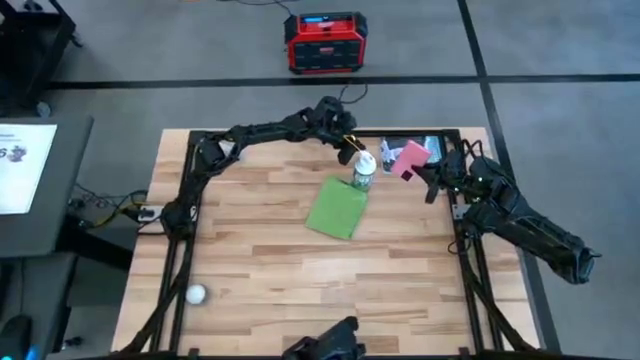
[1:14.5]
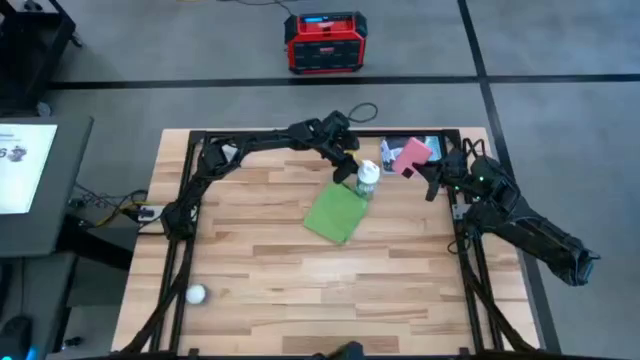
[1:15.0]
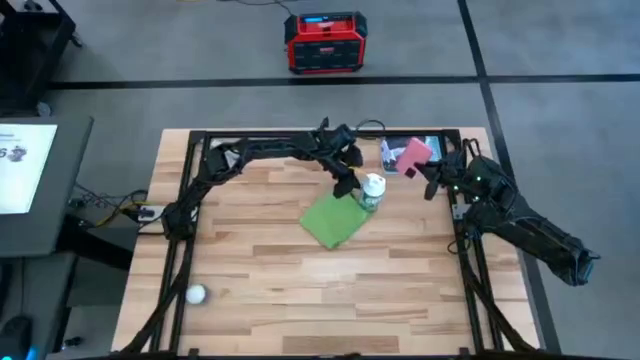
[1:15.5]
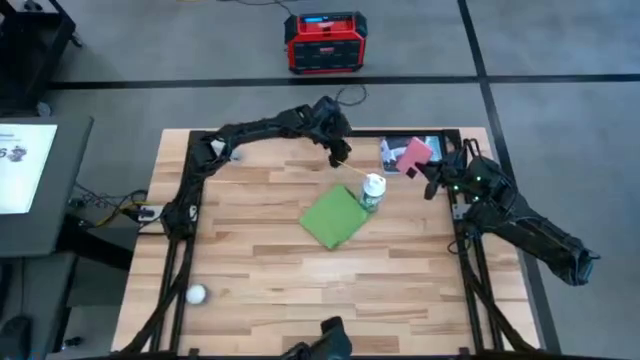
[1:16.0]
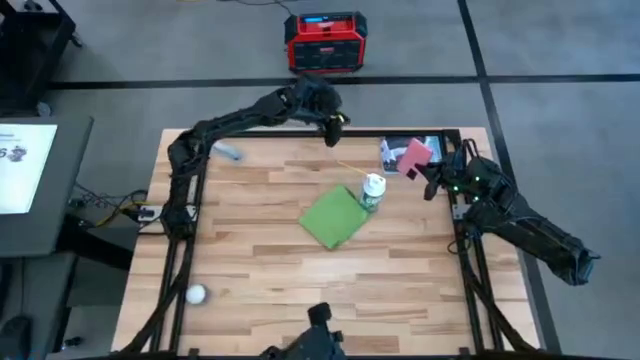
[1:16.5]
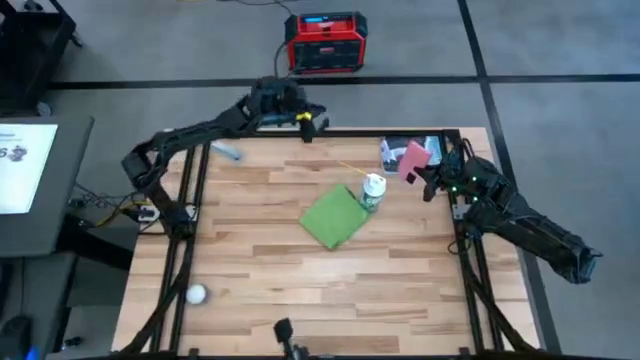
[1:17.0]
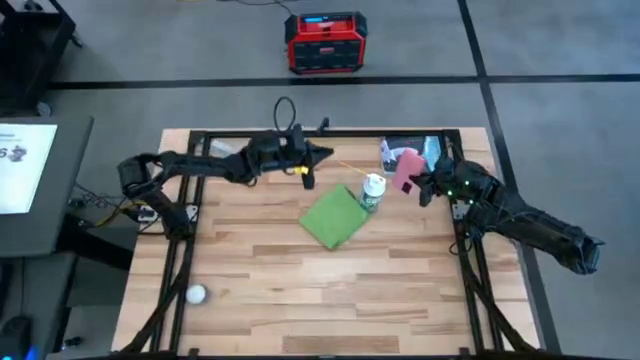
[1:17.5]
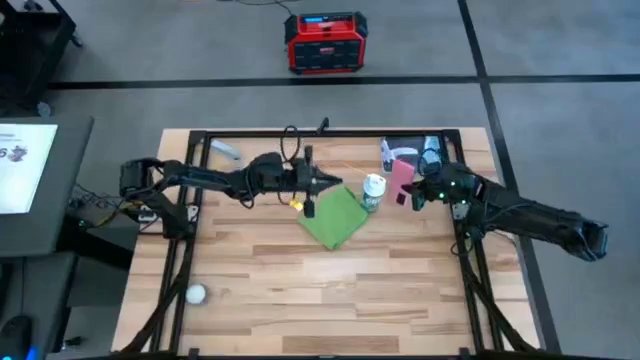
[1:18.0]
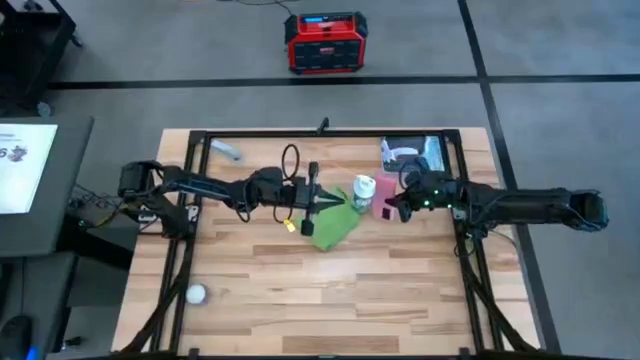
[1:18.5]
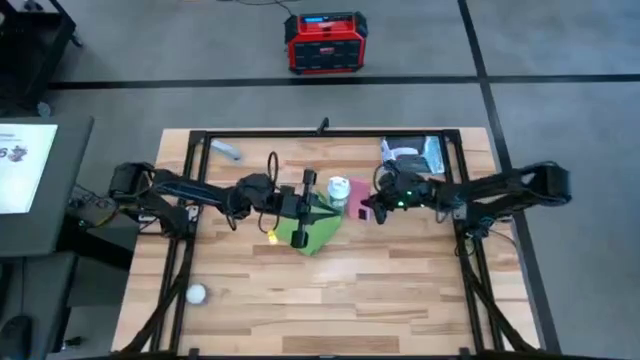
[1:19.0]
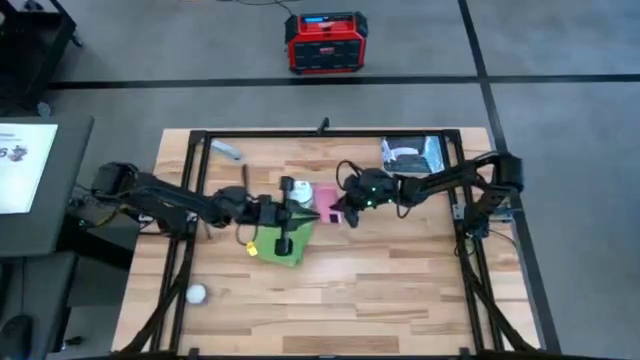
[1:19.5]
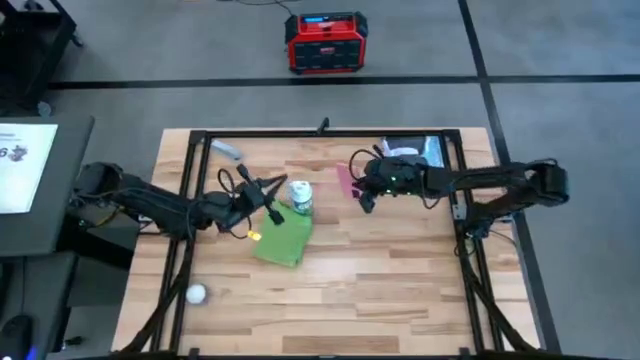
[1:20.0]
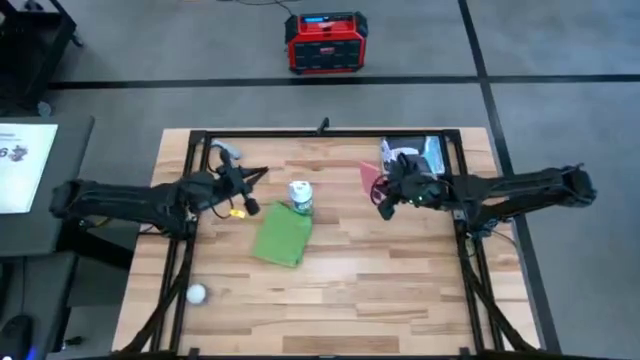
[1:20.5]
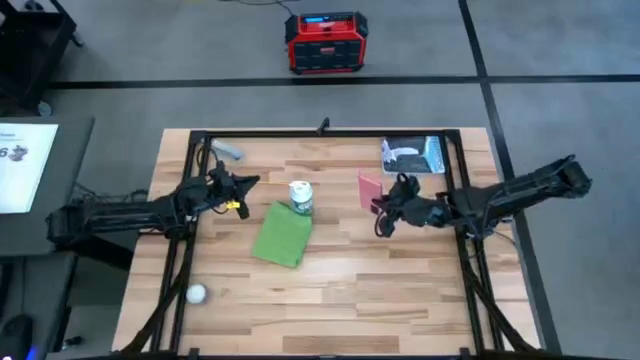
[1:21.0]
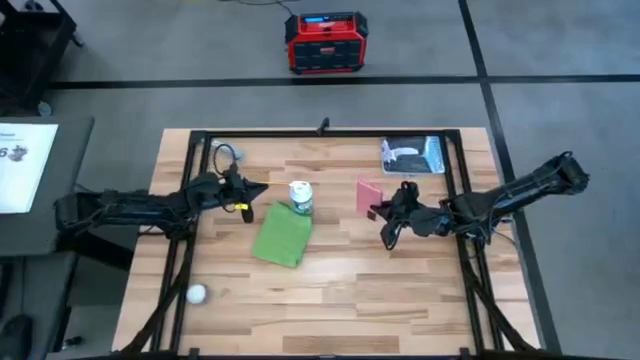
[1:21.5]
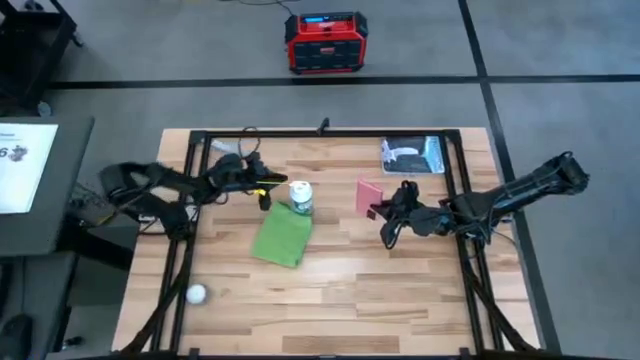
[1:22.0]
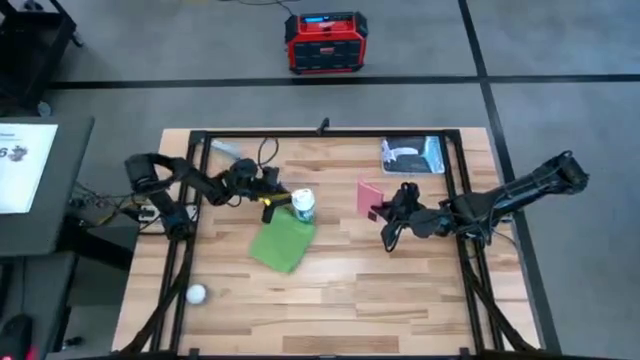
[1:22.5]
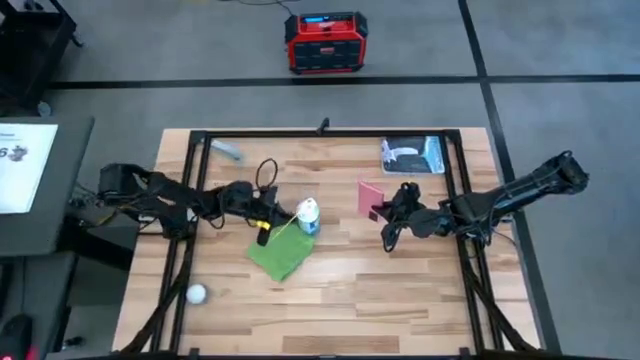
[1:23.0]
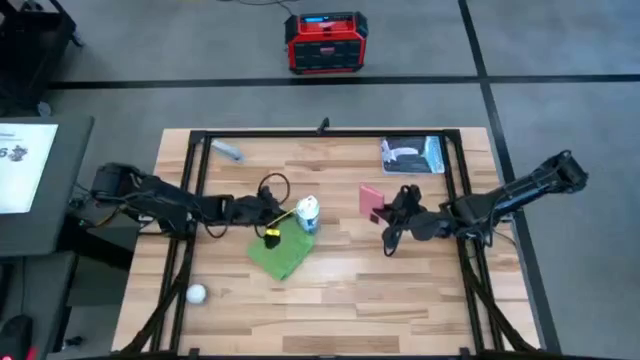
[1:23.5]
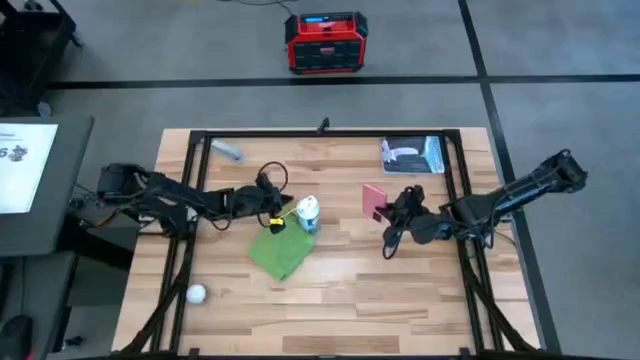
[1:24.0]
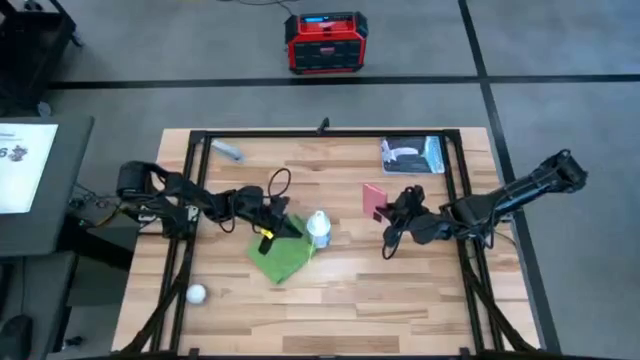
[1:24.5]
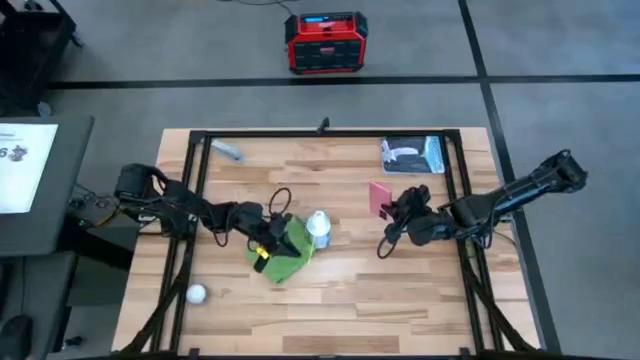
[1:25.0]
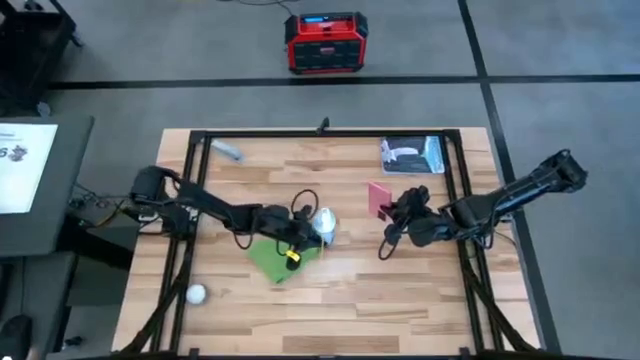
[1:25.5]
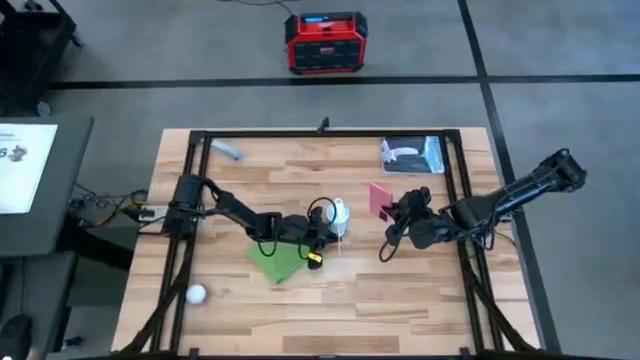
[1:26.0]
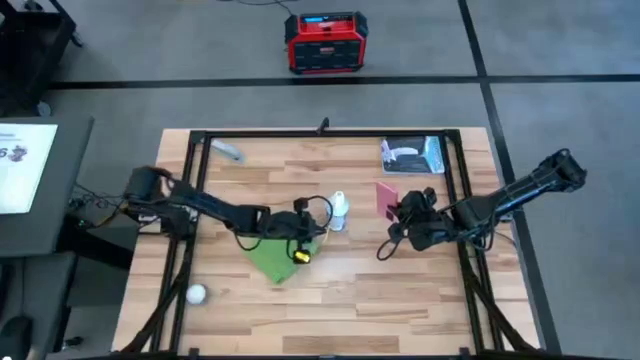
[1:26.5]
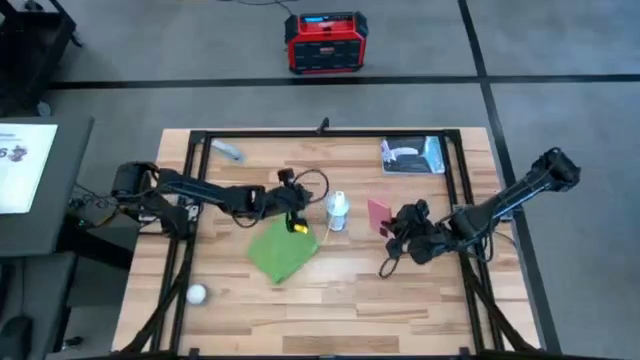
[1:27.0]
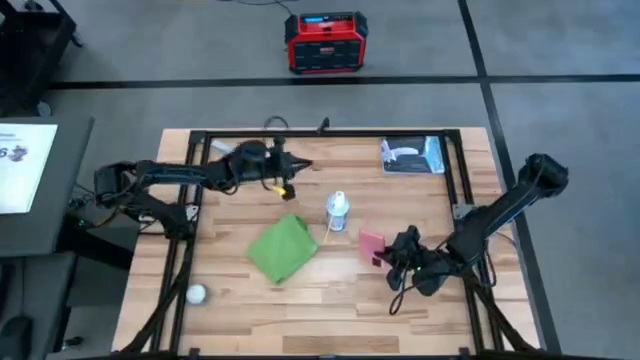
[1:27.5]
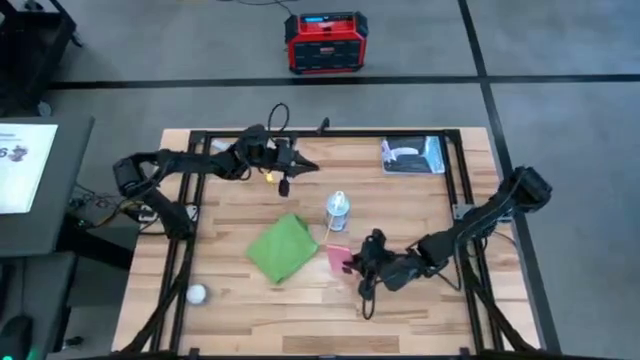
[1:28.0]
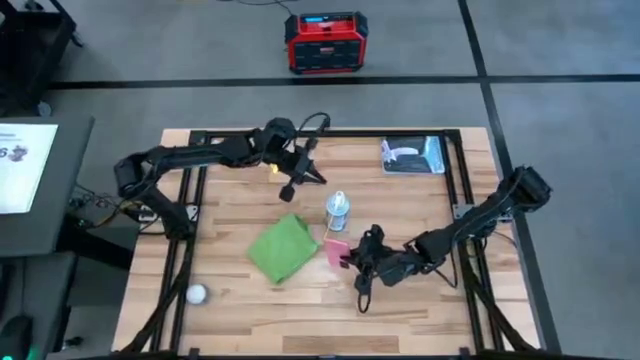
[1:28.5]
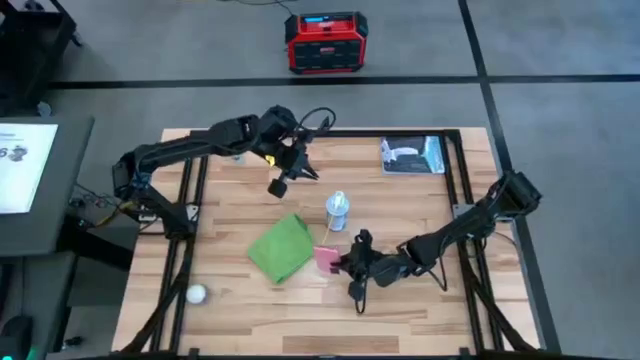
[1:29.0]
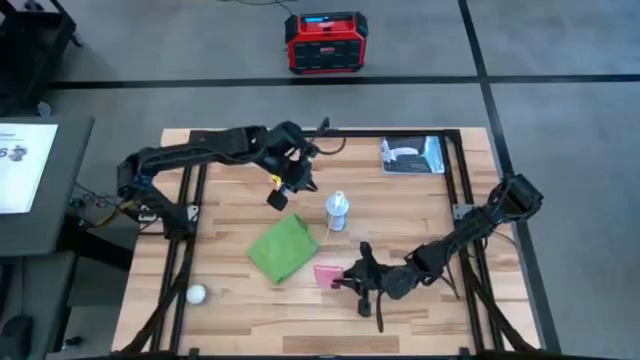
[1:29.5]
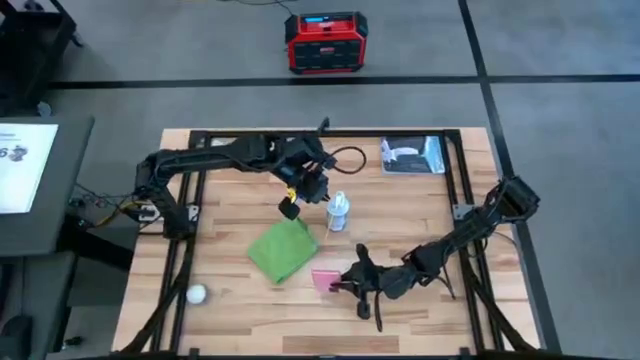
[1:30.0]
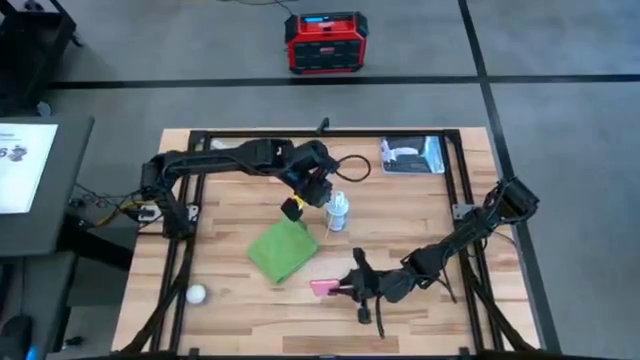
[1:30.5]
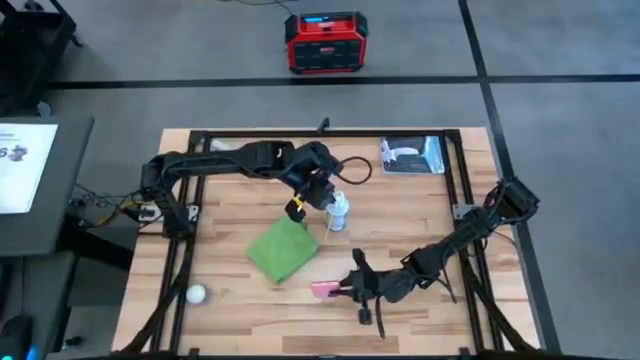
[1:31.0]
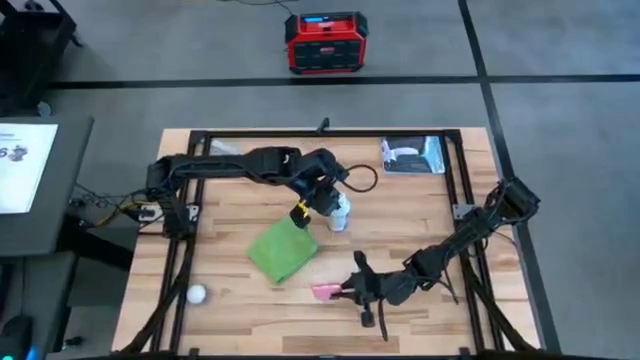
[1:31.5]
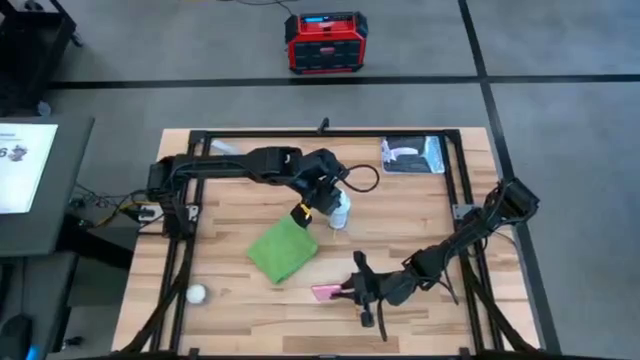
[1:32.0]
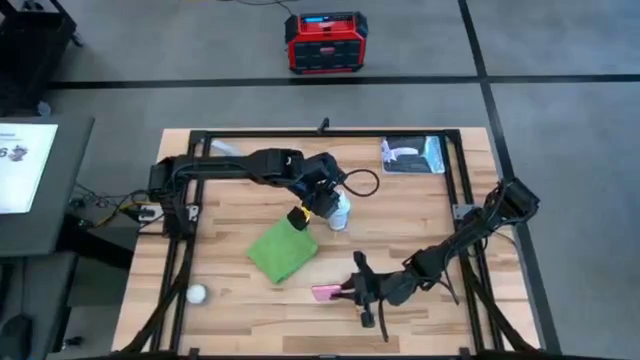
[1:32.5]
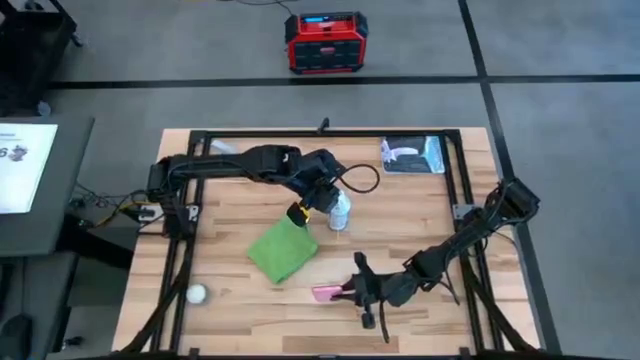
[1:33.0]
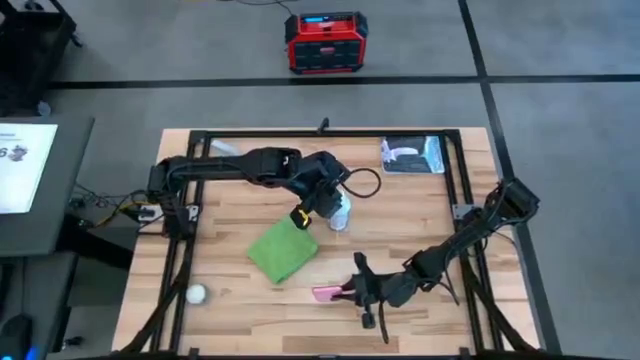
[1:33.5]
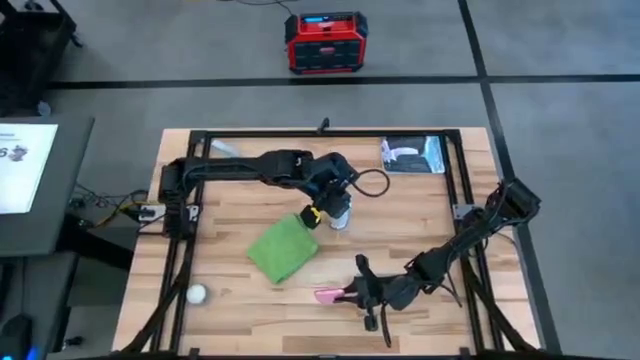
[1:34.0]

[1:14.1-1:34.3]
Task: Apply microfiber cloth
Spray the cellphone using the cleaning bottle

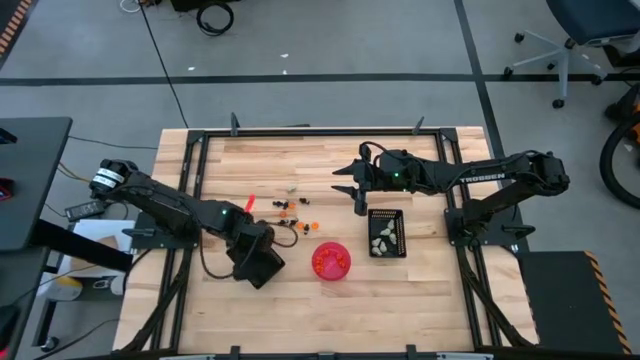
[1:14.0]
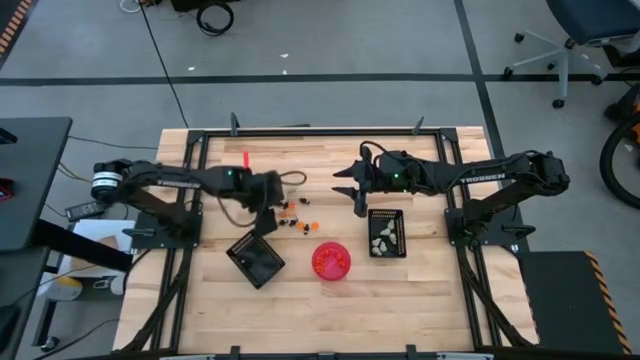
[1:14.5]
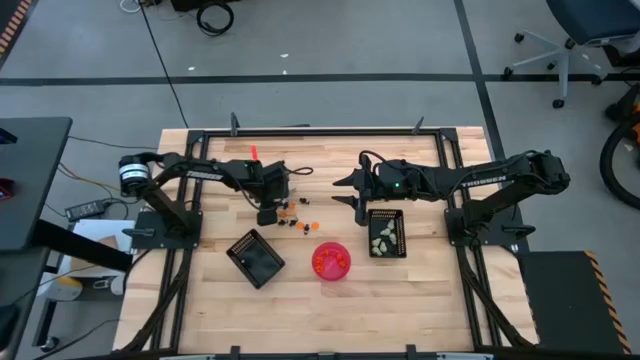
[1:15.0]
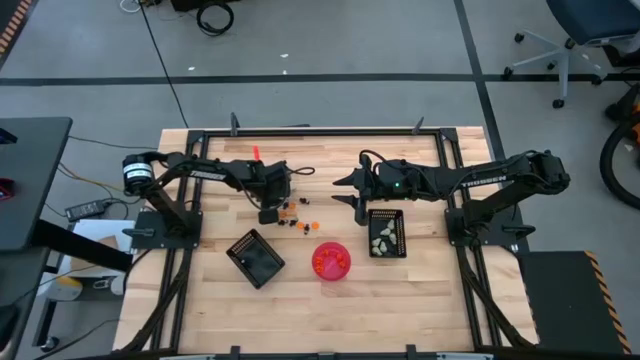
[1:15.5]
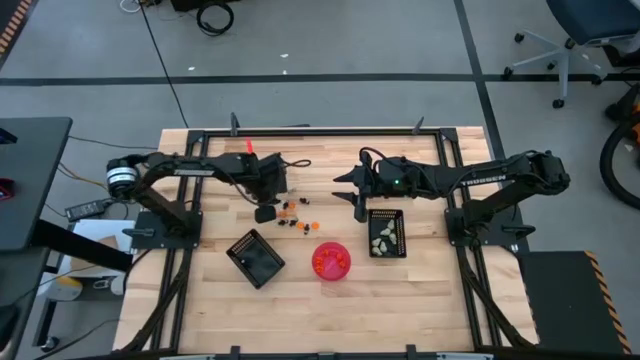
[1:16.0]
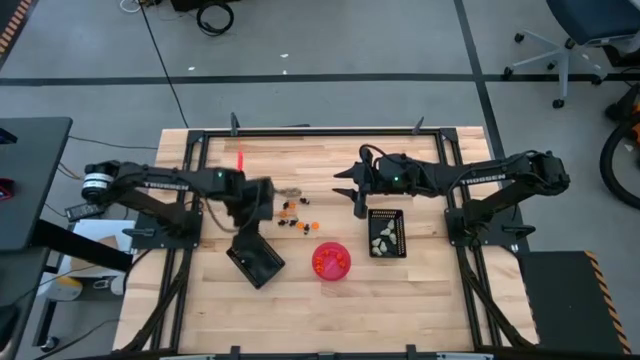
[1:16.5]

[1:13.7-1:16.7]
Task: Sort Halloween decoration
Put the black skeleton toy into the bottom black bin
